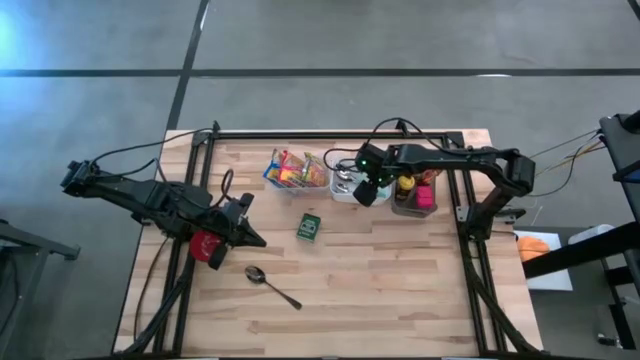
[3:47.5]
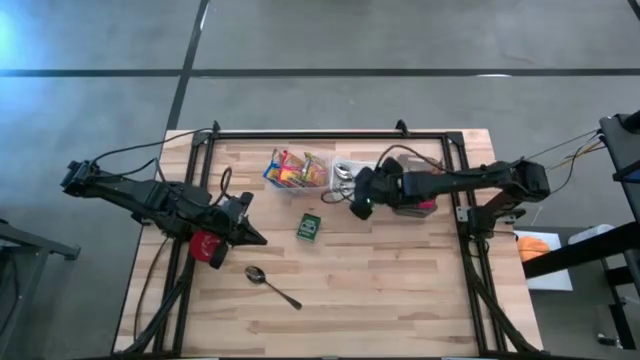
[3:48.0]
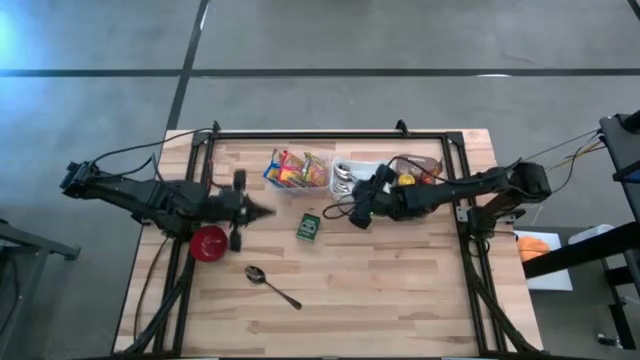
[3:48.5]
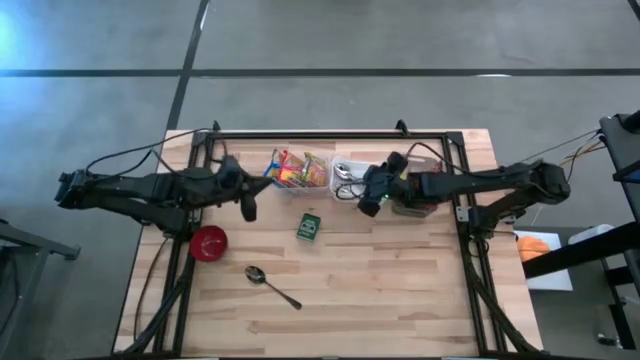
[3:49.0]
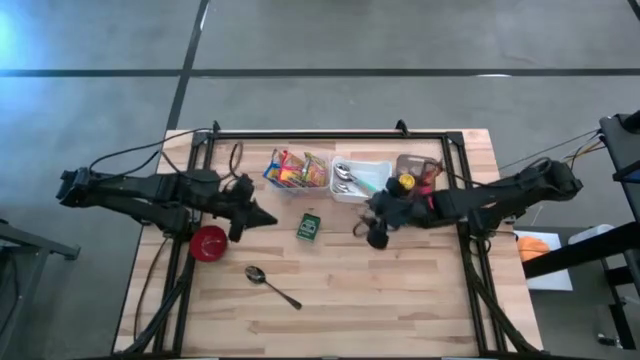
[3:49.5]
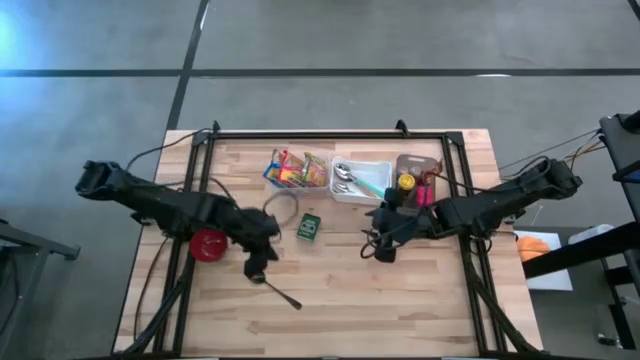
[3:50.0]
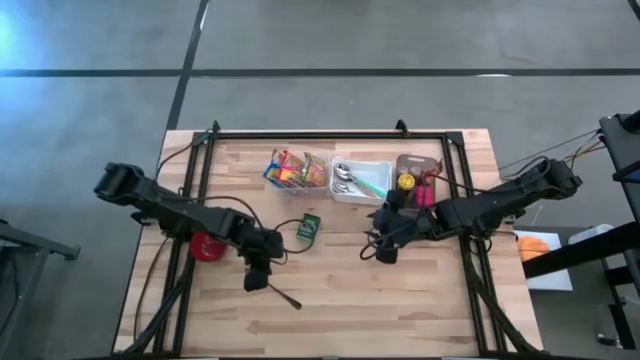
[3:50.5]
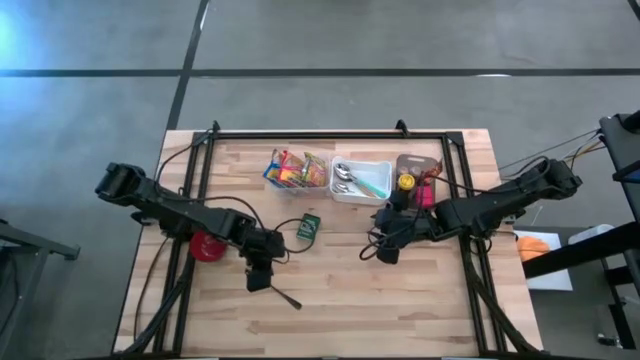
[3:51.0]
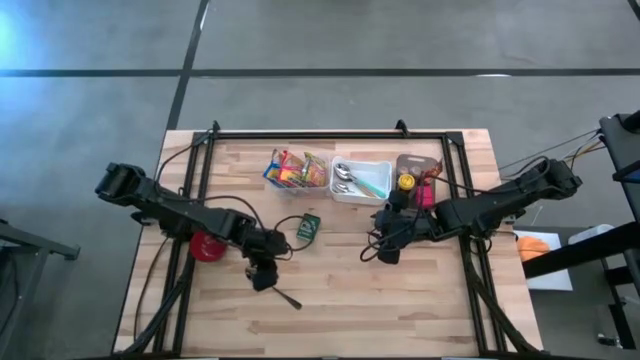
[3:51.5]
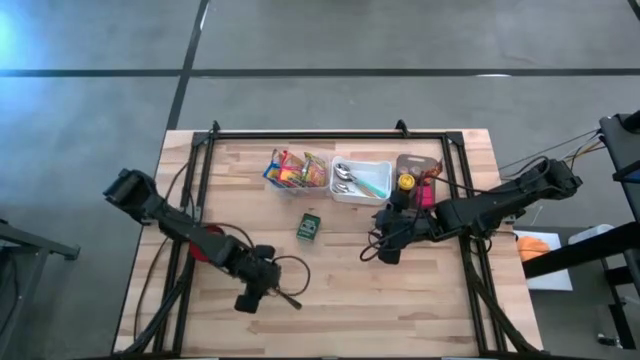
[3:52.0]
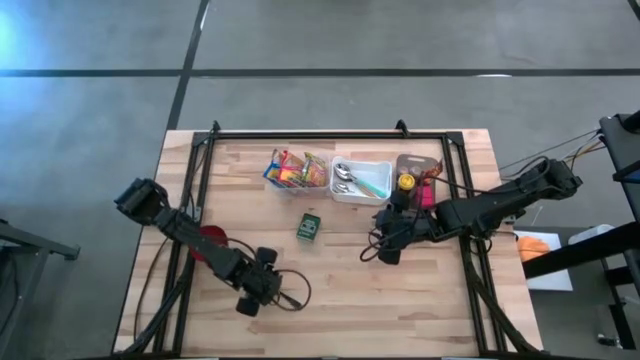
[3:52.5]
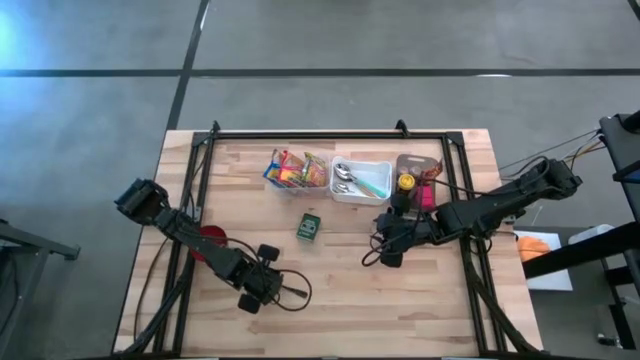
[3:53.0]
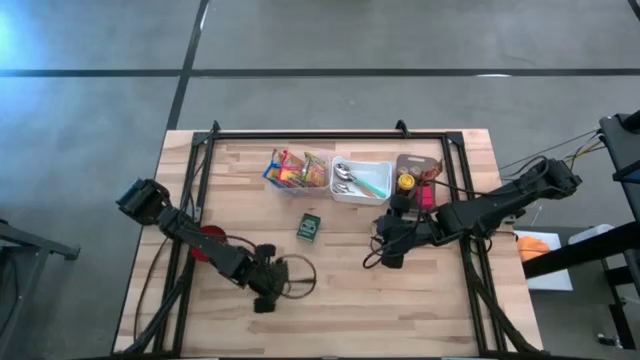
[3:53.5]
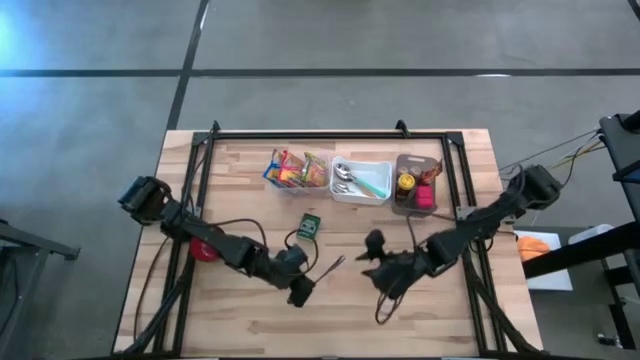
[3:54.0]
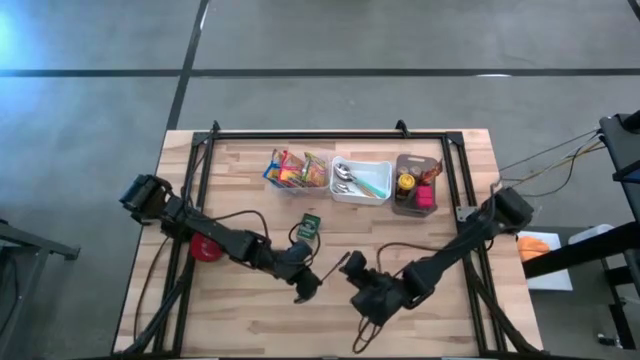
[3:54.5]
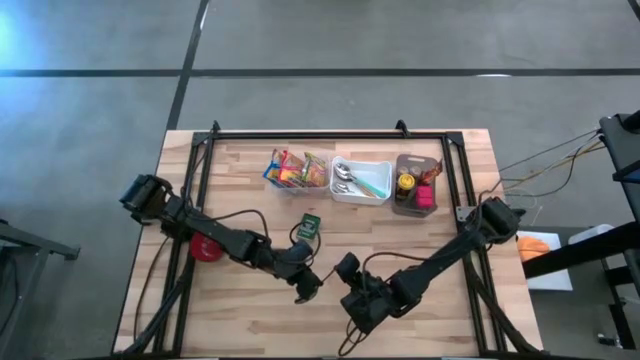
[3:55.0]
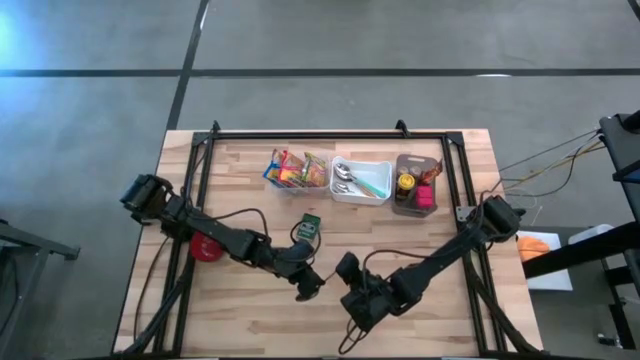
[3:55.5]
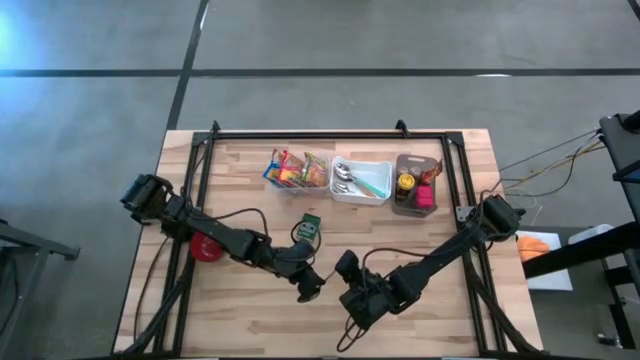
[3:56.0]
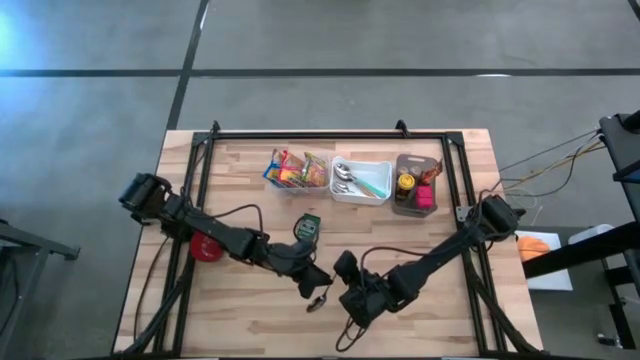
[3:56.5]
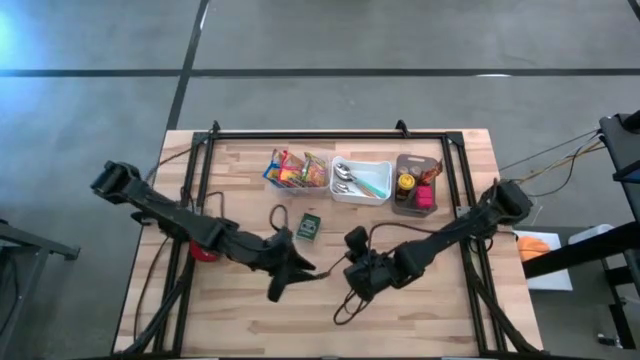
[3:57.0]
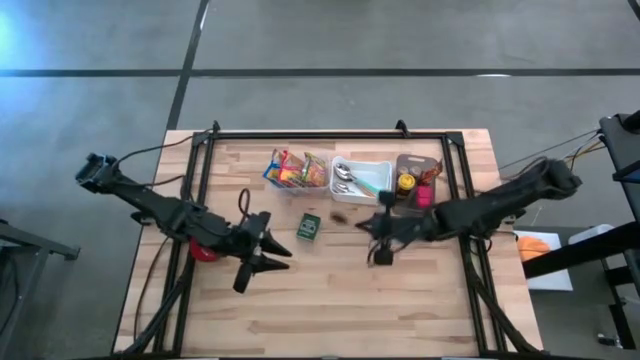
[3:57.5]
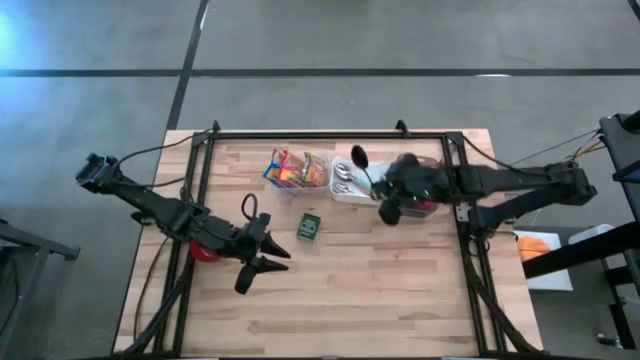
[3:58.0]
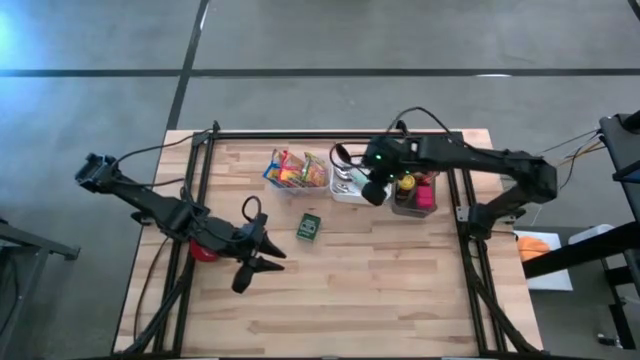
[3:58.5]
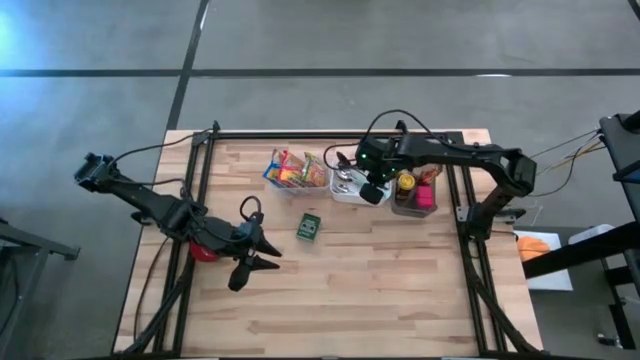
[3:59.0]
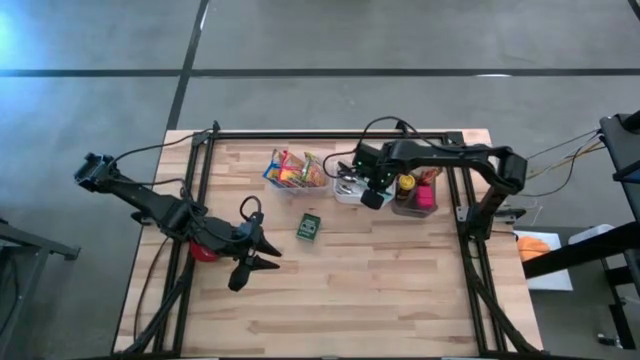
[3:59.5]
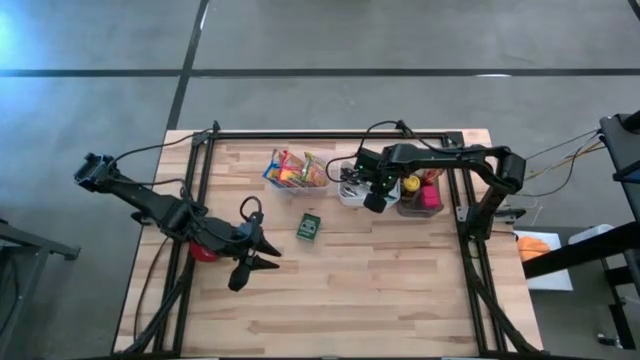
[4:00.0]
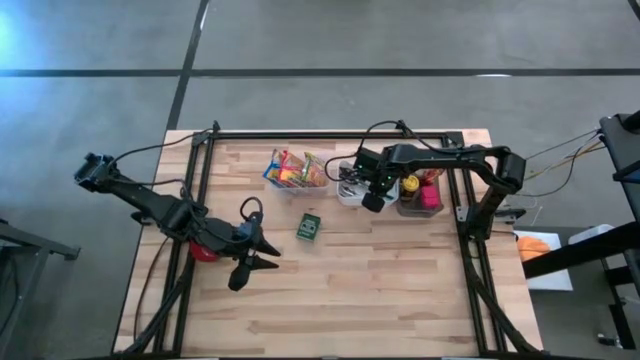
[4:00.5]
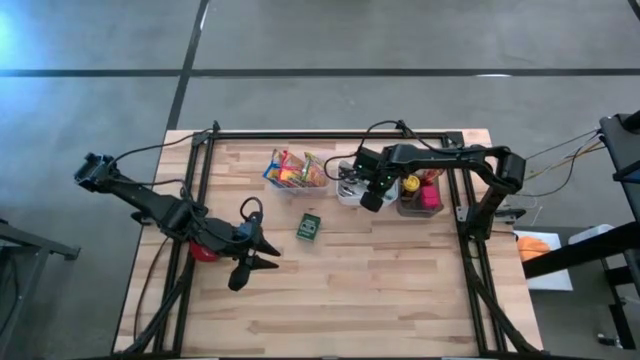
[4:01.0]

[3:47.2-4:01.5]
Put the black spoon into the white bin
